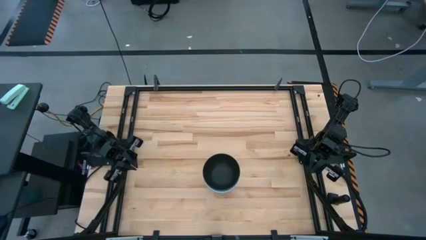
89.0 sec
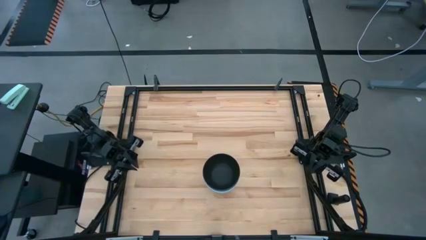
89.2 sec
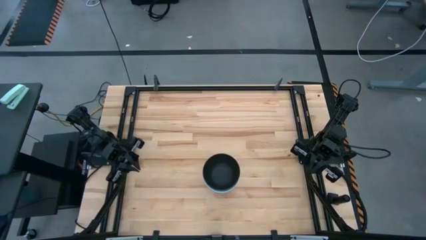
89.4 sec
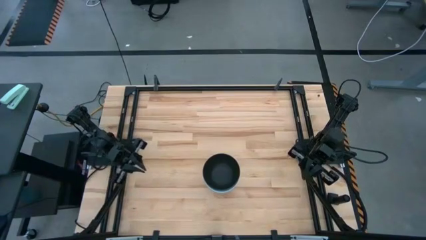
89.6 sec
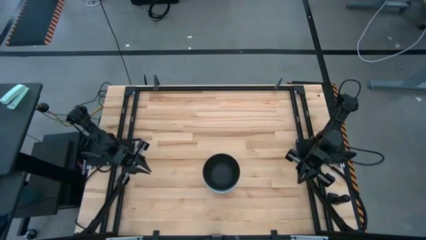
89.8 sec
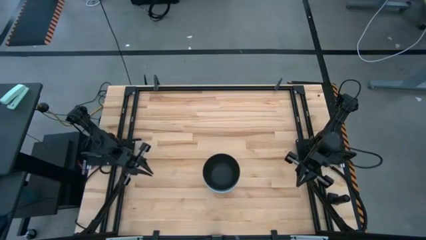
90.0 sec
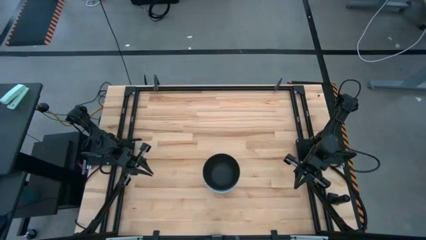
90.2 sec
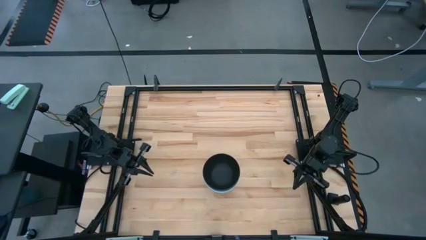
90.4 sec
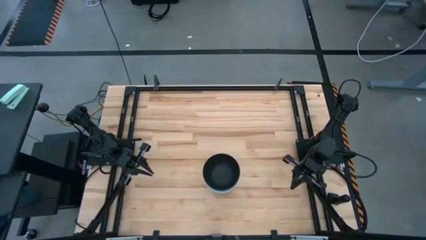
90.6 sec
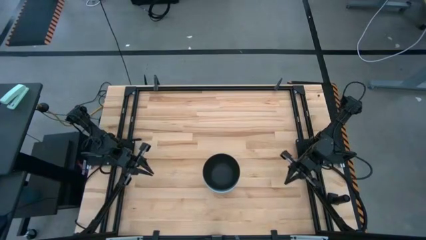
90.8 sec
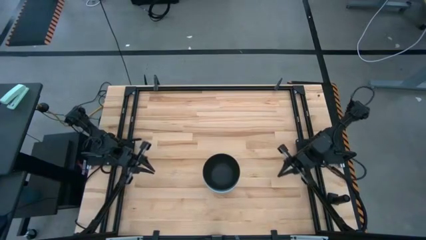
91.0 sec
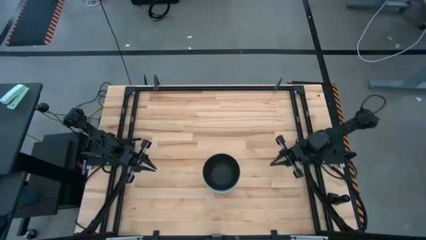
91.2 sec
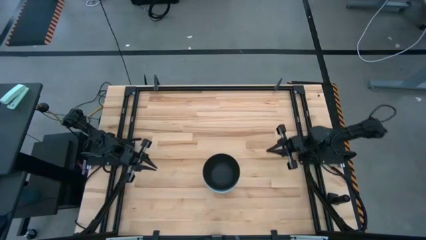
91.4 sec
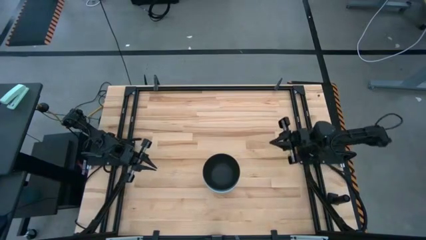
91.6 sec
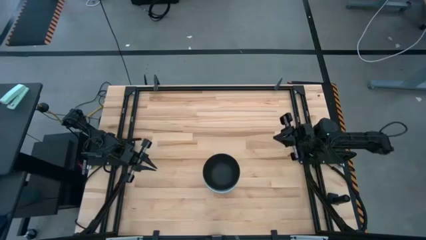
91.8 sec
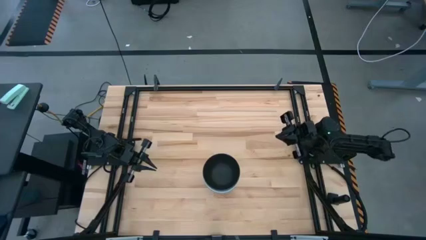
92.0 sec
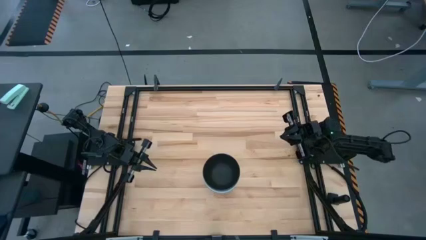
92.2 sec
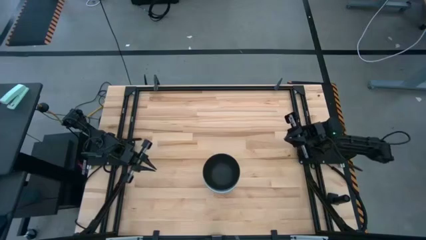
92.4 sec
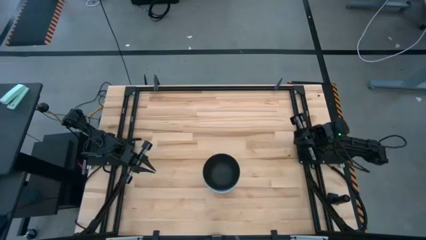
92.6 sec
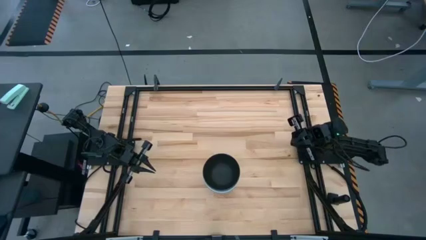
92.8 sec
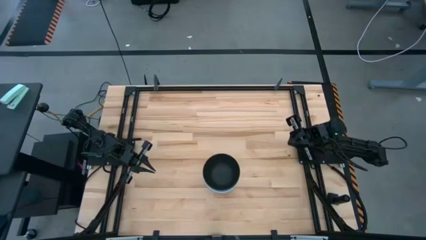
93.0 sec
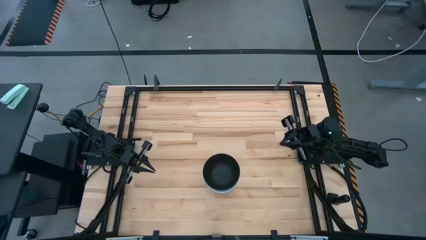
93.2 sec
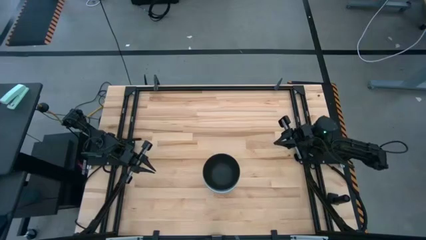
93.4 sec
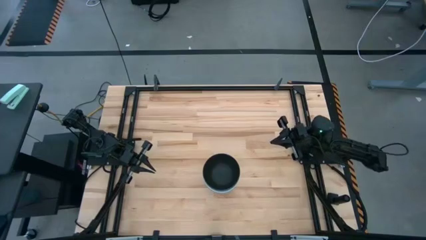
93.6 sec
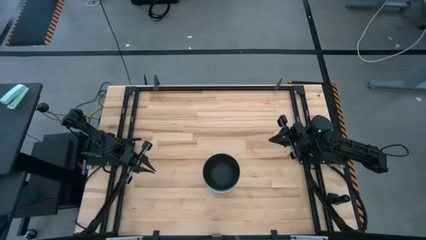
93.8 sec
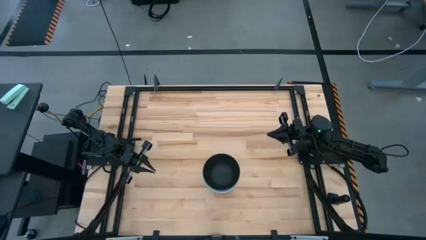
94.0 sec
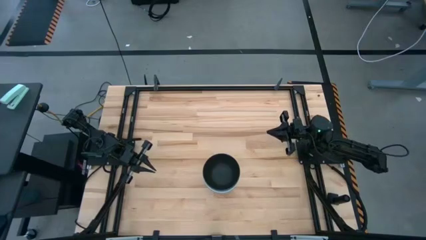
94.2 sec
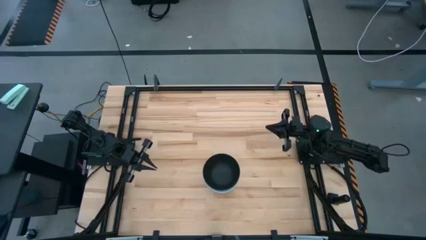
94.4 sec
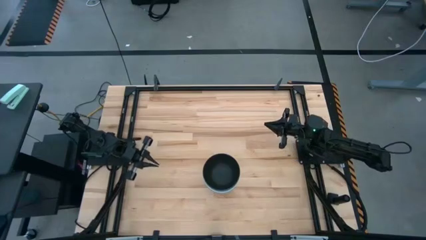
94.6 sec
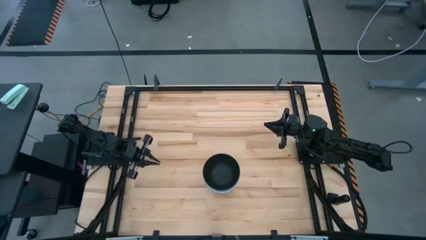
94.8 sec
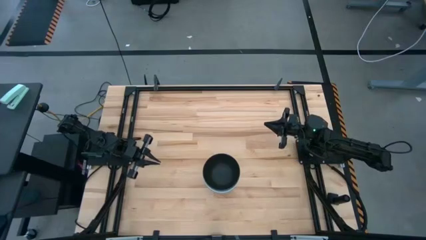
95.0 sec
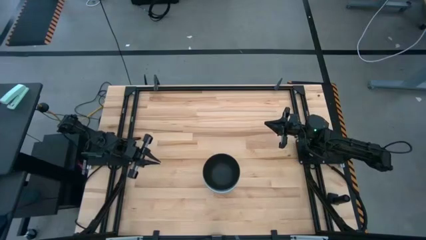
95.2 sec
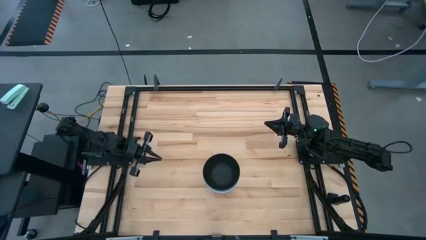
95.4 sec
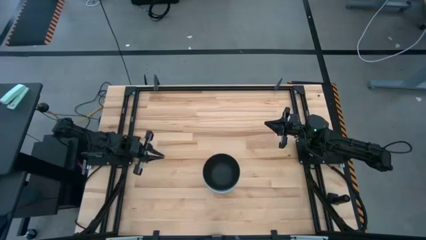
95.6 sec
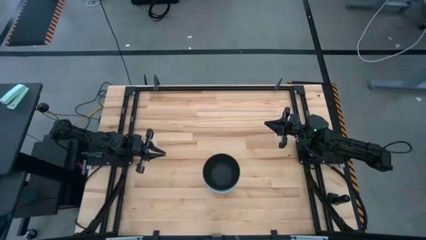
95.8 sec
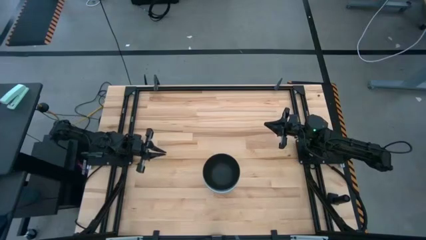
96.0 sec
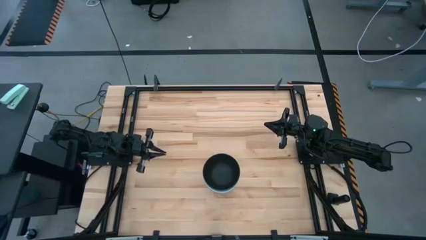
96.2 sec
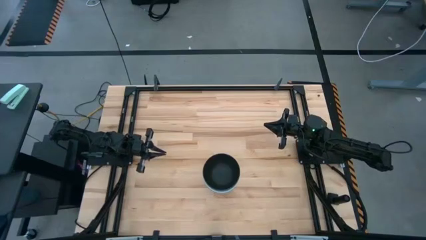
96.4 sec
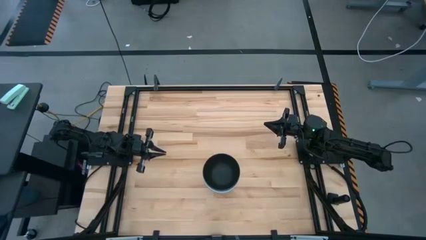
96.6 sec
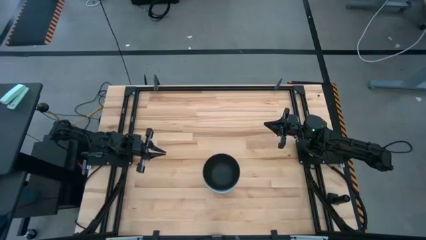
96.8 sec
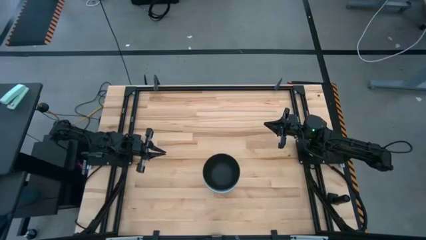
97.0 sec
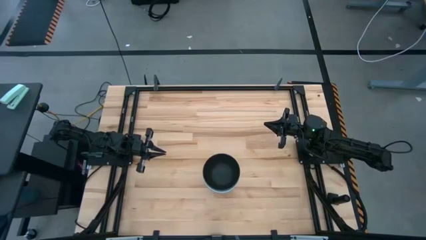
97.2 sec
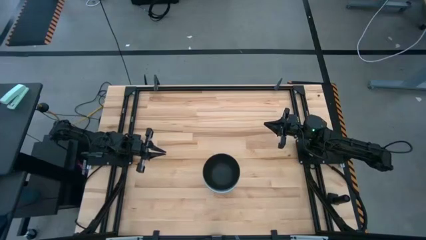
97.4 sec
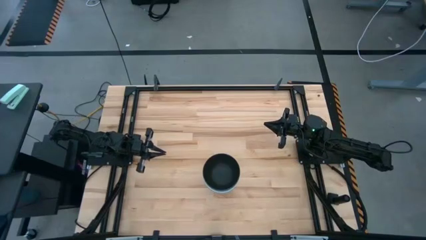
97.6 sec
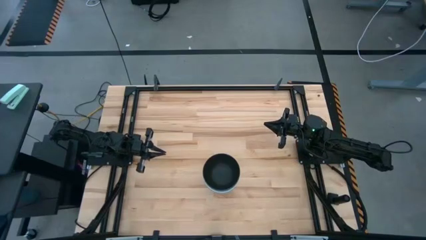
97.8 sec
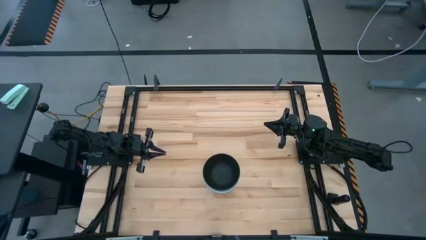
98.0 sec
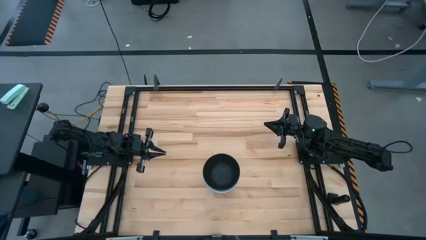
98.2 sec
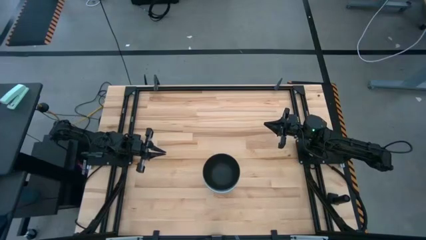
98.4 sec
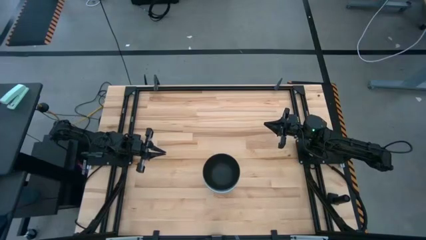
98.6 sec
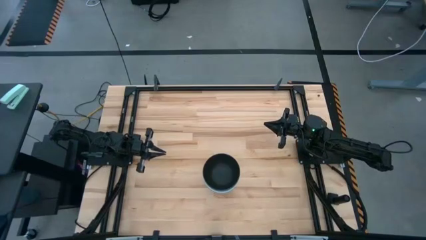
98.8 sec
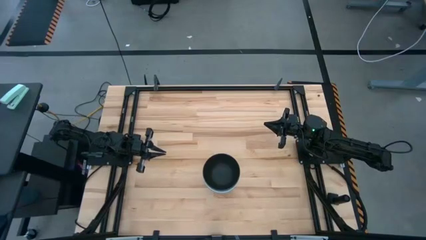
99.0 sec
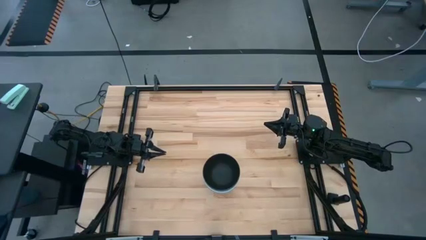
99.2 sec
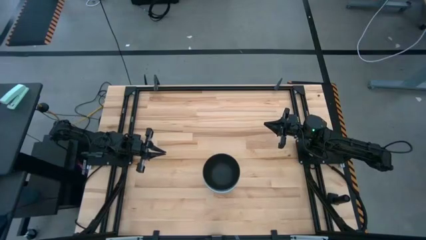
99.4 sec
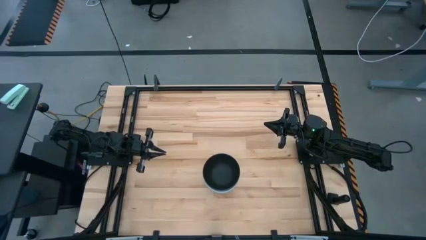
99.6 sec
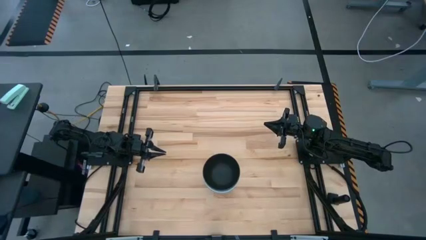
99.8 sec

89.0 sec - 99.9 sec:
Task: Nest bowls inside each other
Return to Home Position
